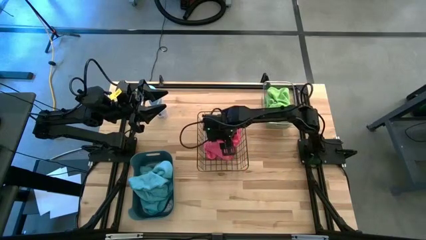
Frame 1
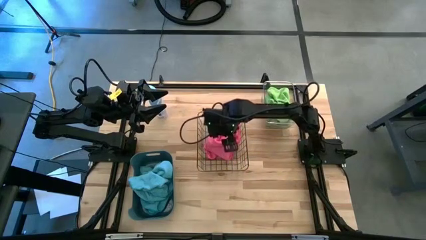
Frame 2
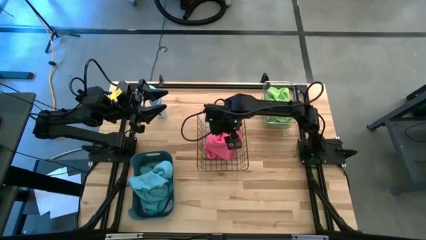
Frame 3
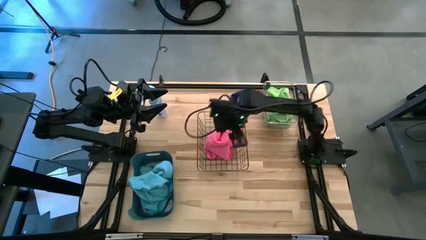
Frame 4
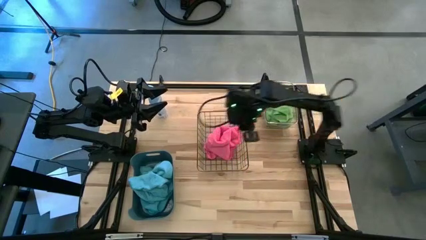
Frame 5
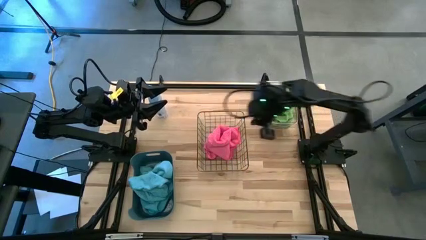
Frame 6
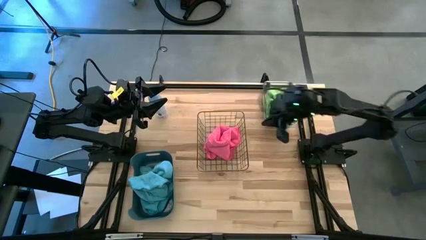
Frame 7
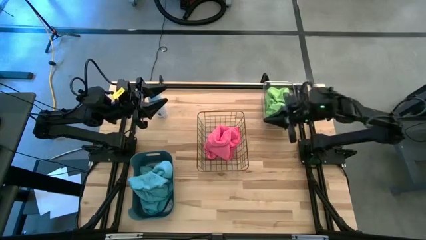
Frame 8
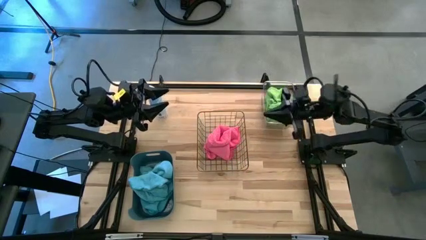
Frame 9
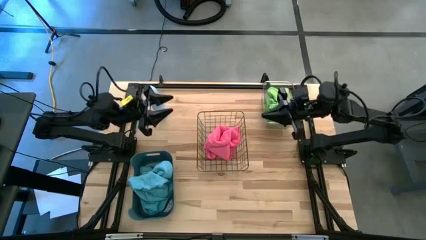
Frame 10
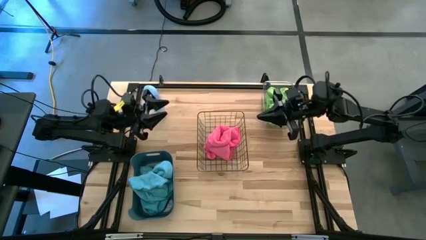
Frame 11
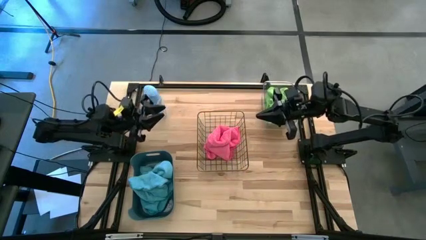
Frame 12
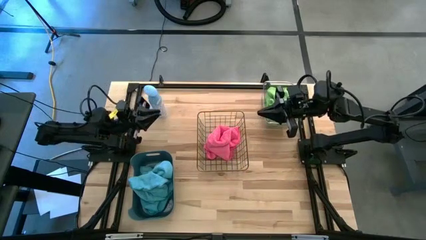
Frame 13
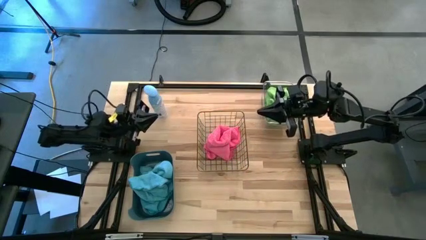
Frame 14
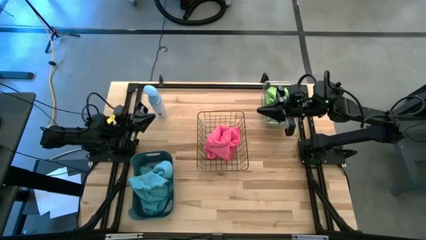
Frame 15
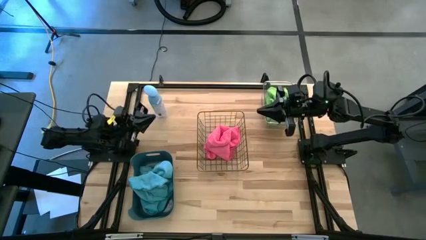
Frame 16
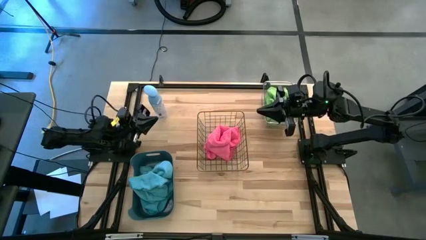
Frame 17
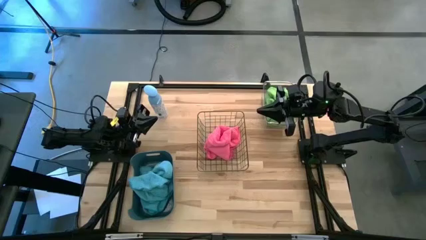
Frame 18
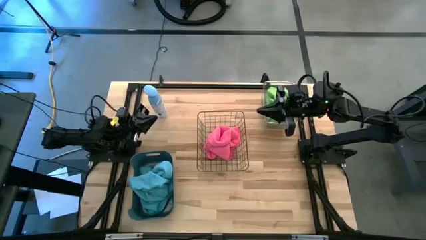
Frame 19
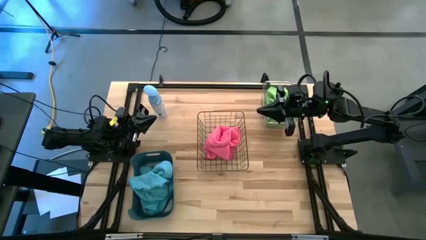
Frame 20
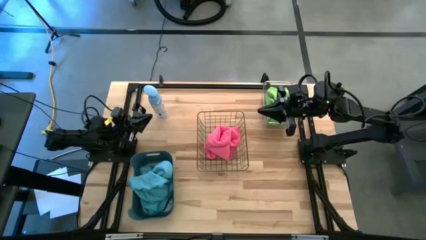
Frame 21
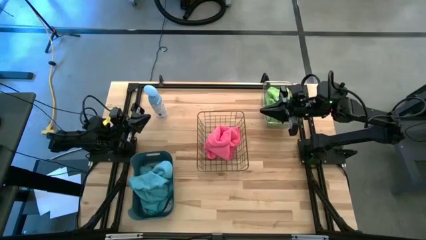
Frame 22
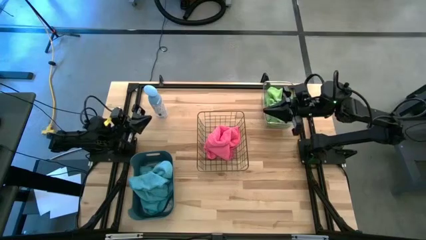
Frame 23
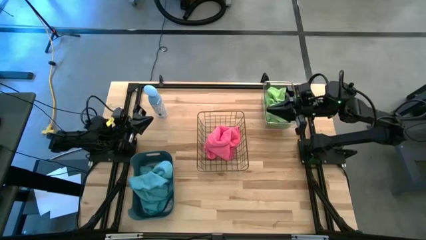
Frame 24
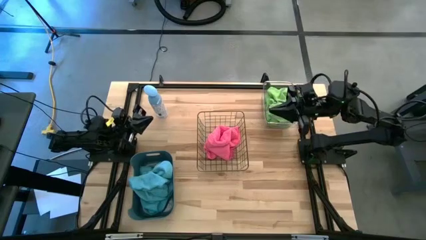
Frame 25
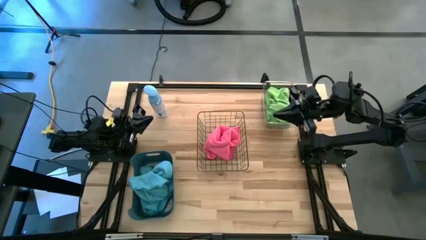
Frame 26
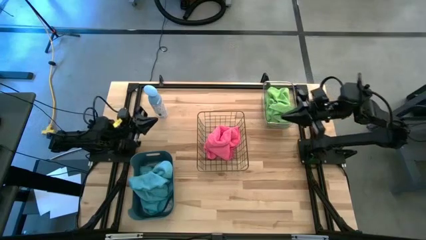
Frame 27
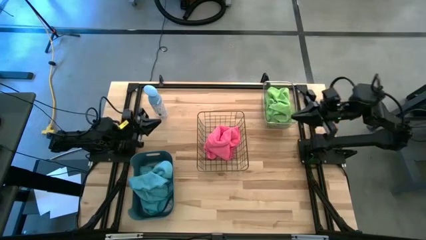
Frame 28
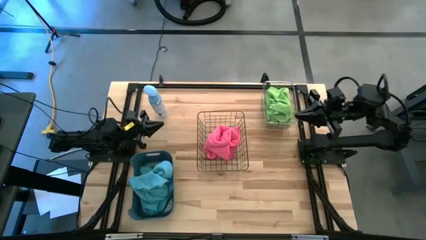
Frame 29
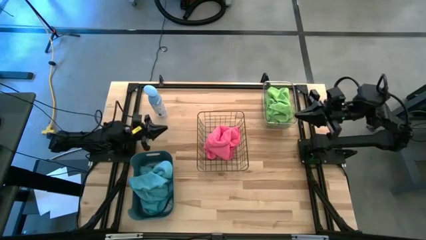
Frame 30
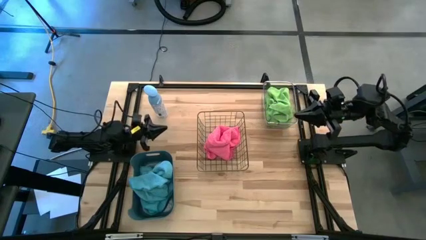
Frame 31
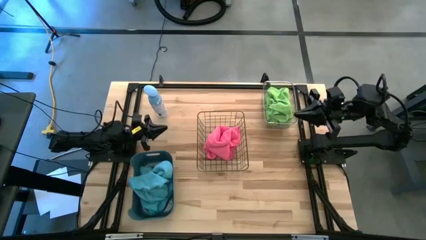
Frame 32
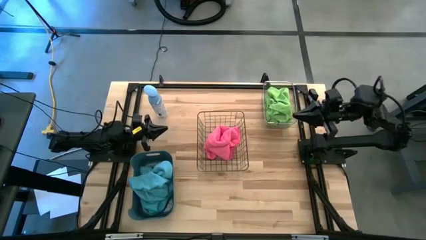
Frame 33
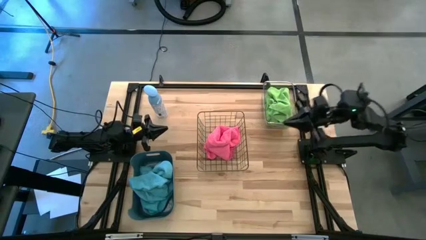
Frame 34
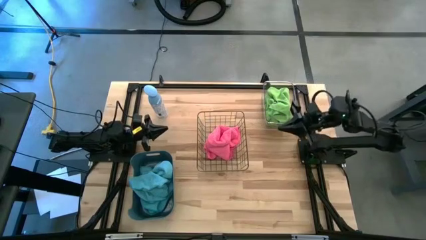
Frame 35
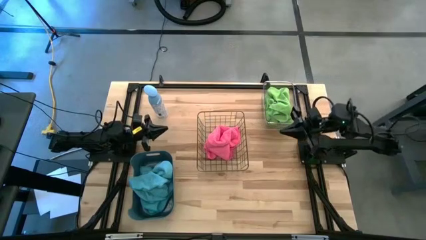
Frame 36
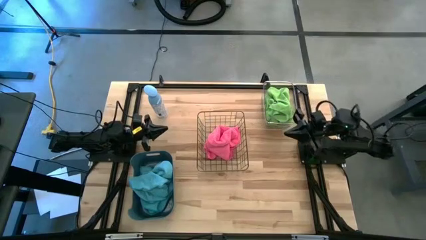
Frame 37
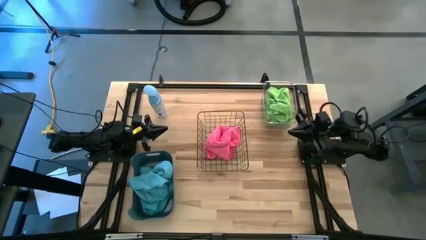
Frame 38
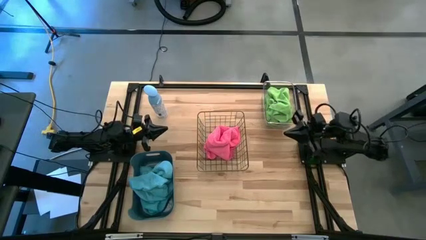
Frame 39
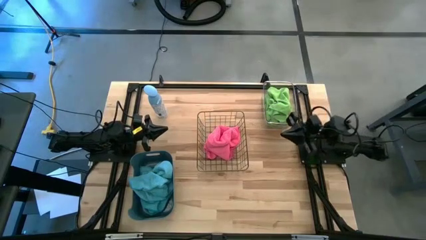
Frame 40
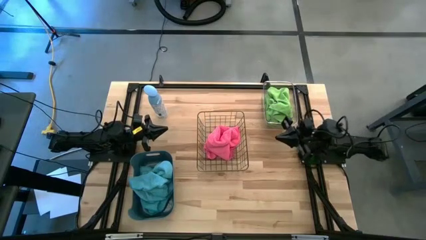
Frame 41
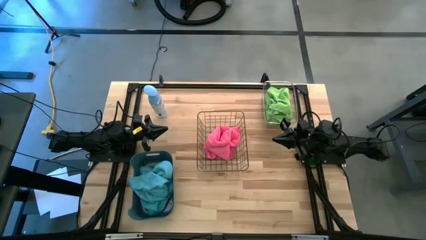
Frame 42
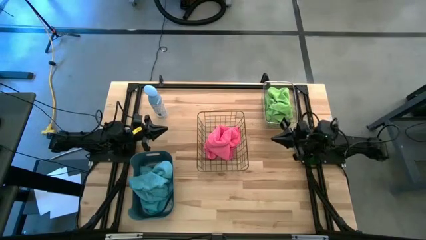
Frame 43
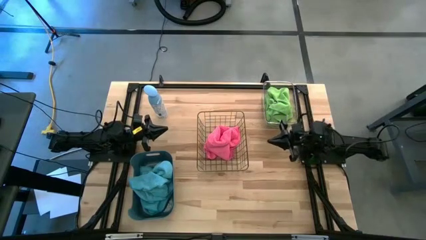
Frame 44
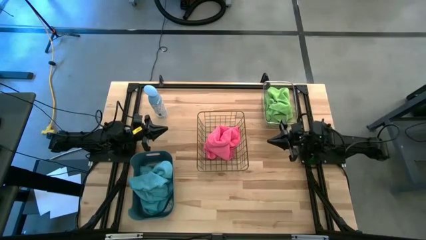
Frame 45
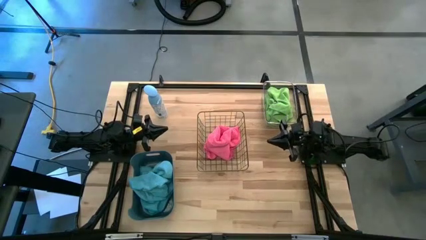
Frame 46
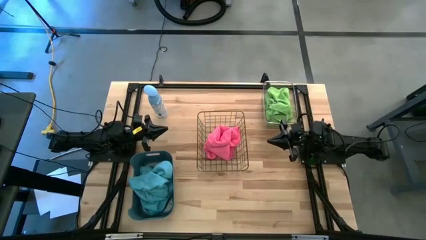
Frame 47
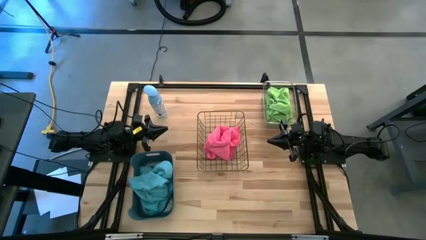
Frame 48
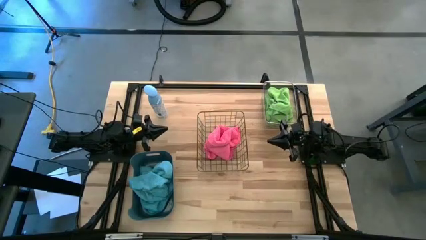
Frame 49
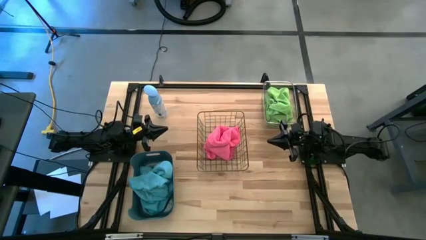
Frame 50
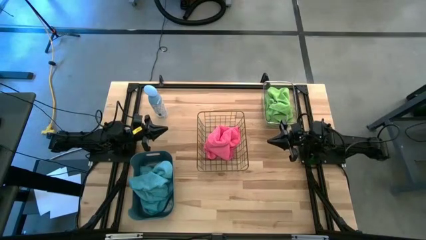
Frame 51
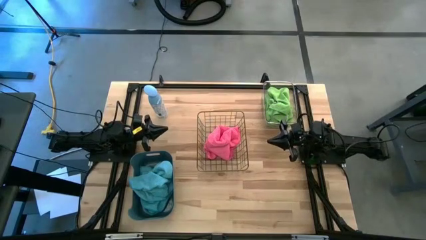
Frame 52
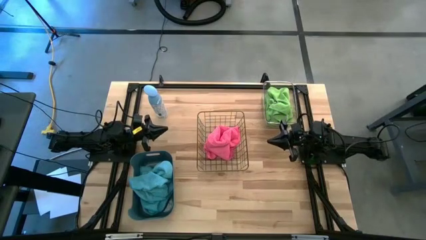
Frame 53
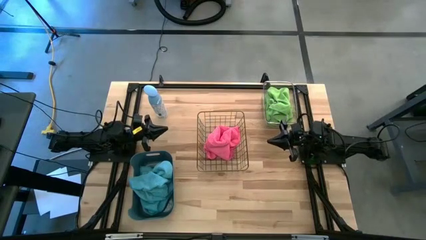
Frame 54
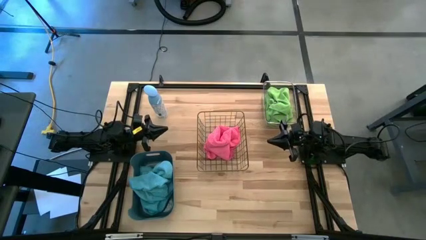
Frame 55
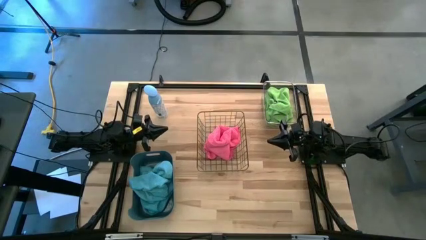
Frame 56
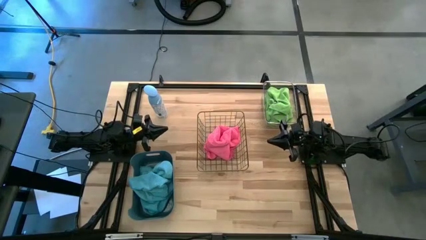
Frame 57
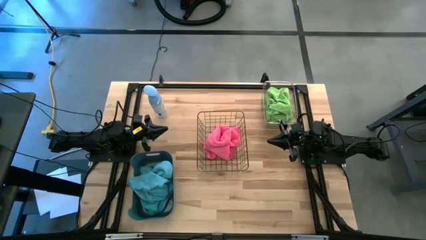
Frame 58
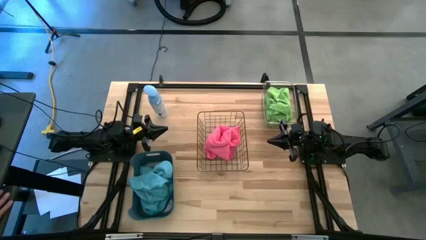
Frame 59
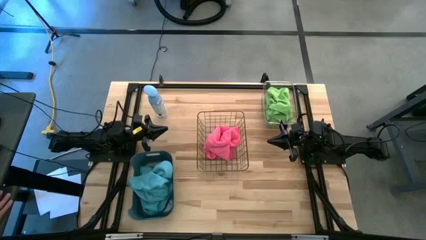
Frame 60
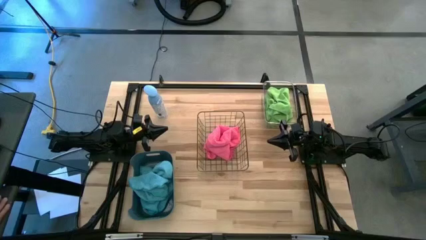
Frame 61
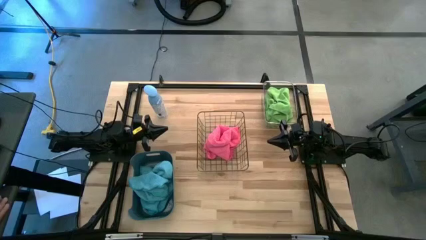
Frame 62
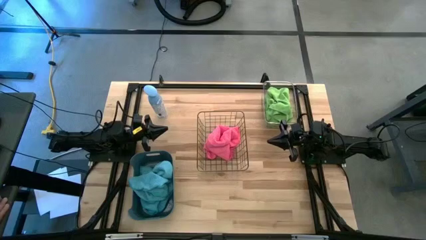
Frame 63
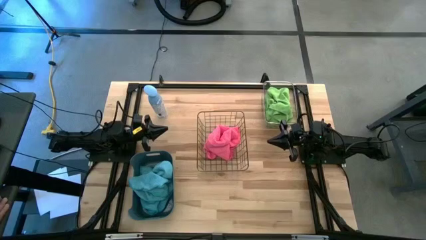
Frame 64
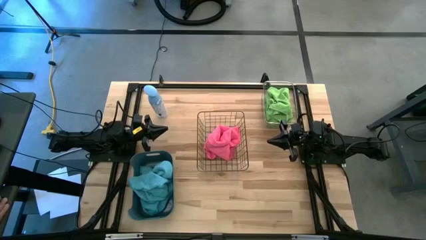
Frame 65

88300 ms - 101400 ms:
Task: Sort microfiber towel by color & place in baskets
Return to Home Position

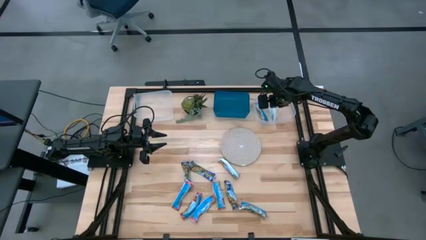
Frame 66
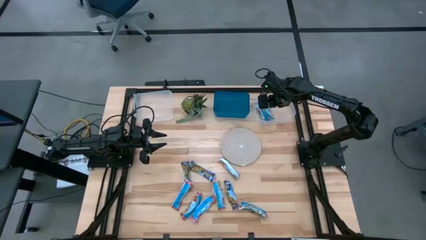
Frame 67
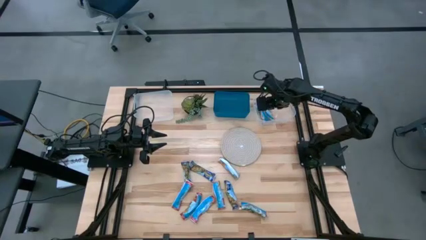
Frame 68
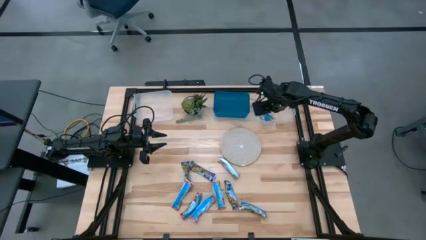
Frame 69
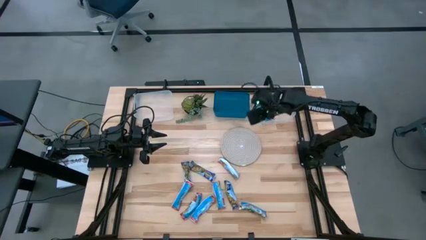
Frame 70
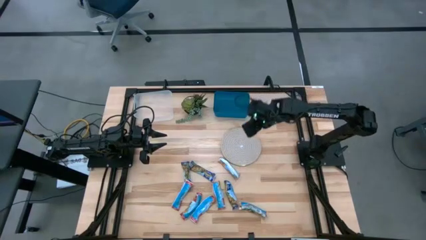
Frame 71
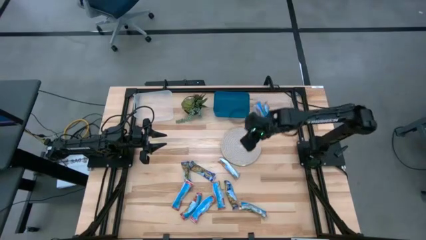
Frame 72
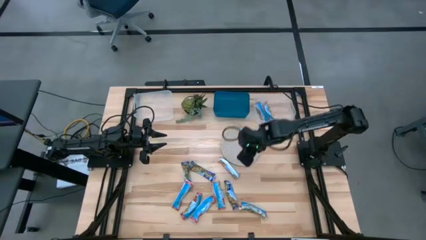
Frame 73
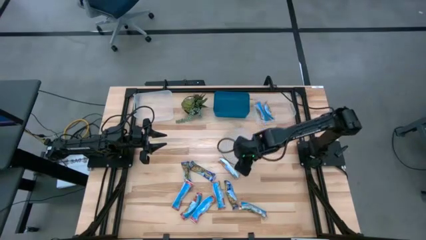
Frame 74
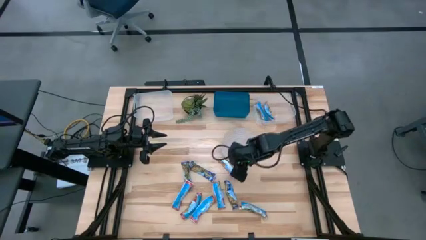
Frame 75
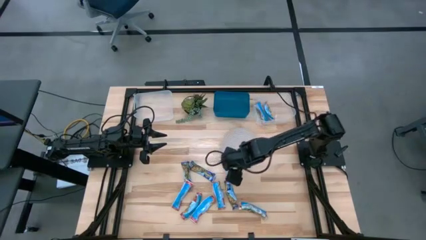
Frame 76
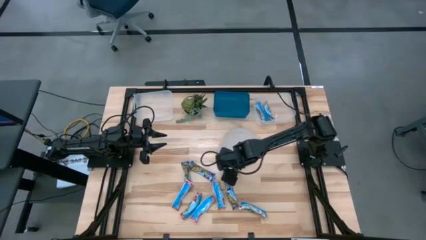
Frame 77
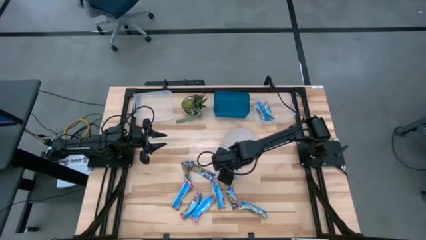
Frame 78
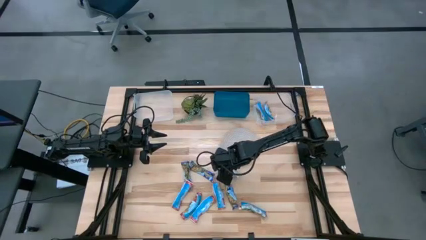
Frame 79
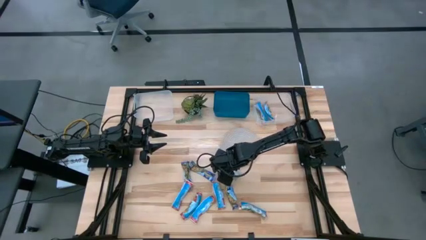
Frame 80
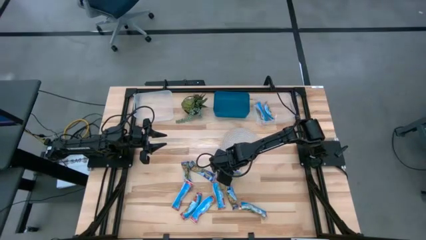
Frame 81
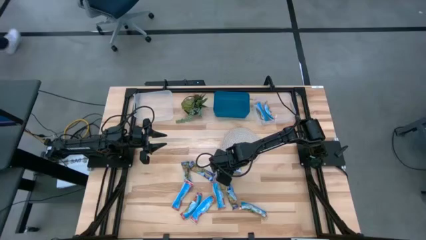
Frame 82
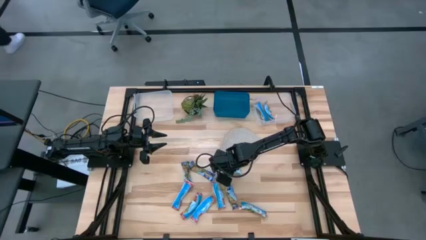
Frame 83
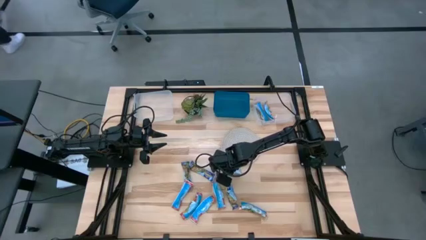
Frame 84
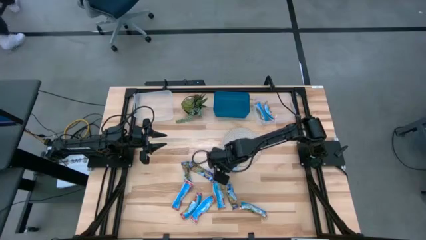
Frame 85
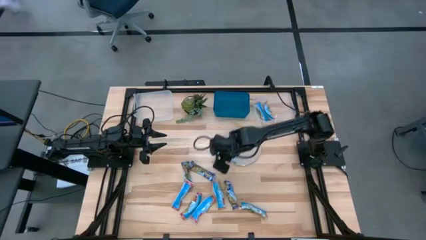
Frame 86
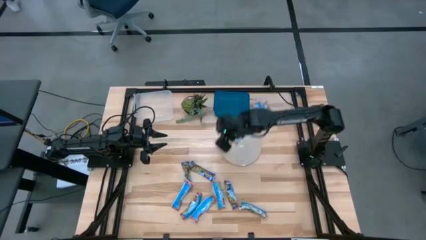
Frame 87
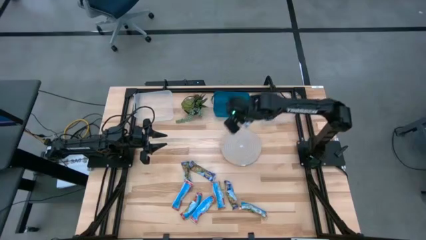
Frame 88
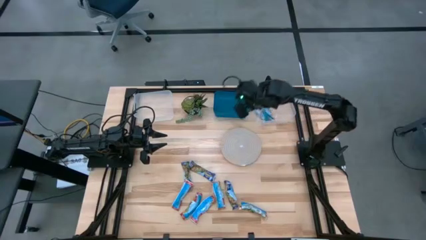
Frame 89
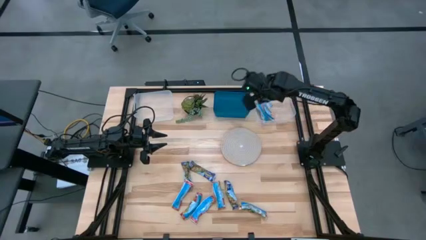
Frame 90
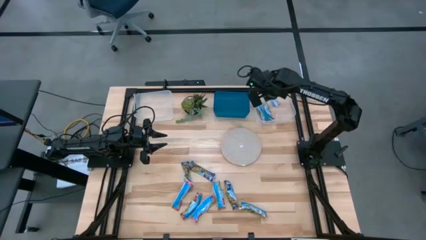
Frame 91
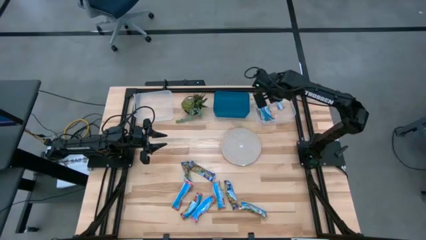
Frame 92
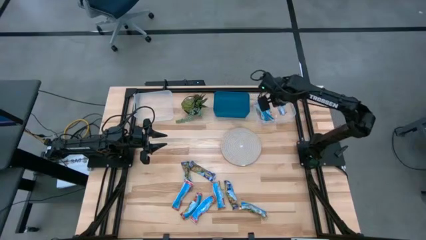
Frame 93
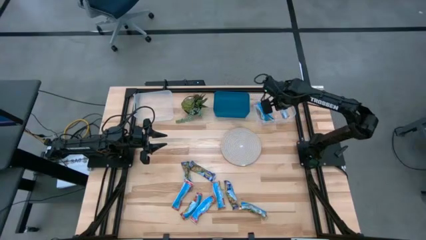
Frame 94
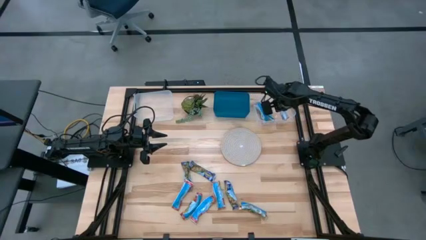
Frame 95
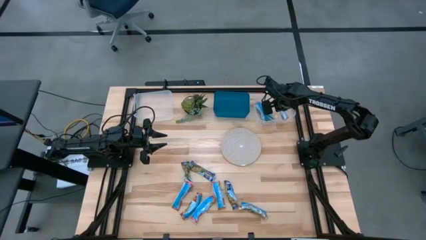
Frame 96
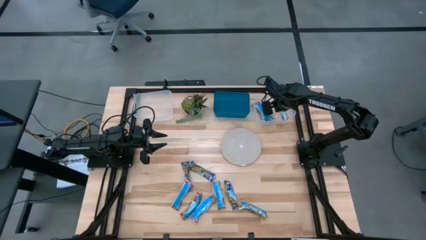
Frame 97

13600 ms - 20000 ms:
Task: Pick and place Granola Bars by type
Put the yellow granola bar into the right transparent bin
